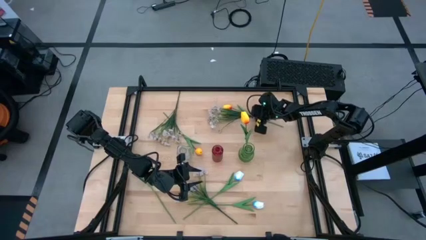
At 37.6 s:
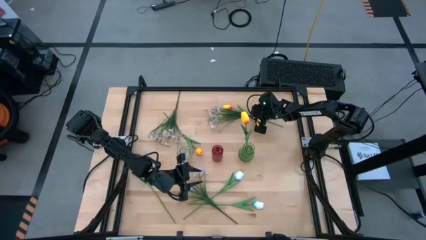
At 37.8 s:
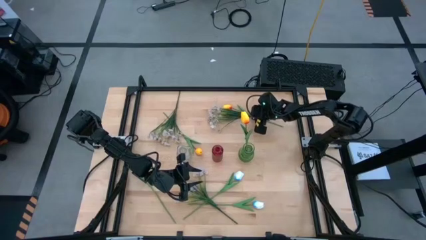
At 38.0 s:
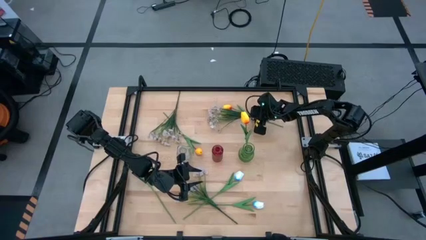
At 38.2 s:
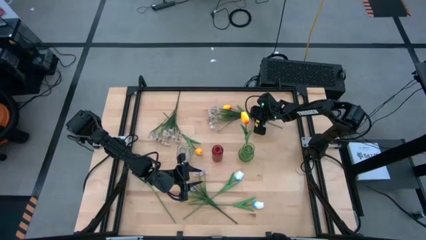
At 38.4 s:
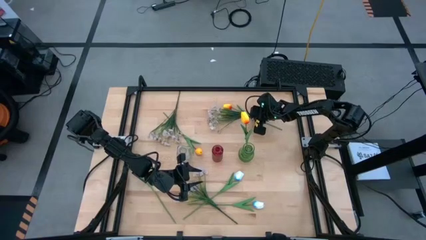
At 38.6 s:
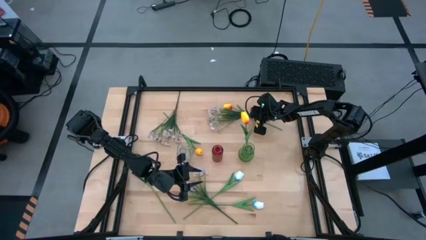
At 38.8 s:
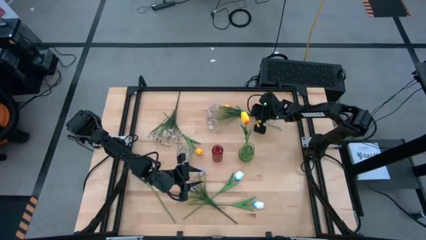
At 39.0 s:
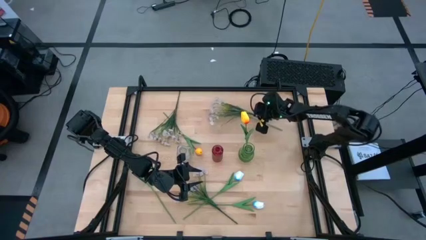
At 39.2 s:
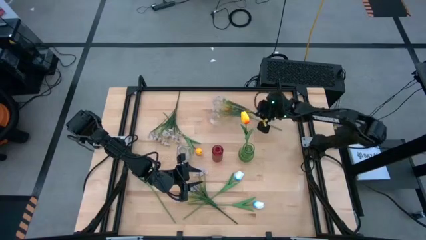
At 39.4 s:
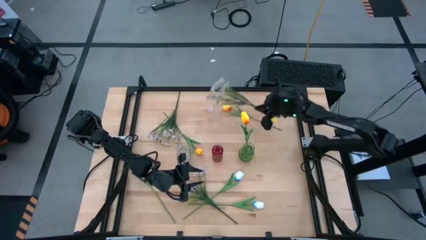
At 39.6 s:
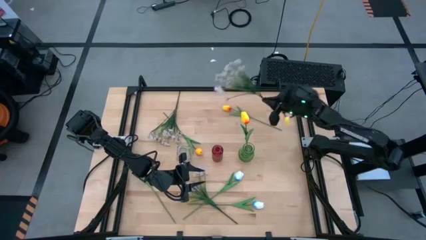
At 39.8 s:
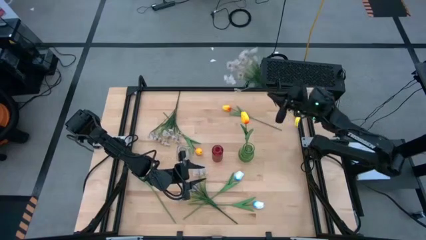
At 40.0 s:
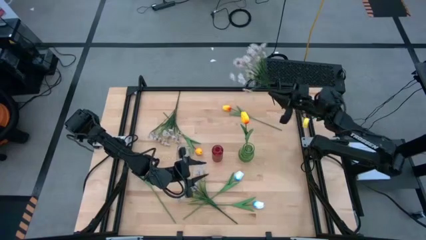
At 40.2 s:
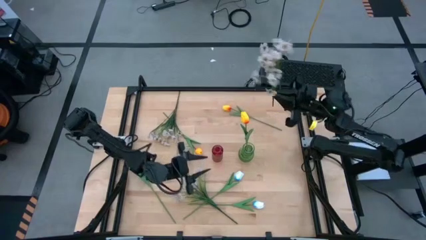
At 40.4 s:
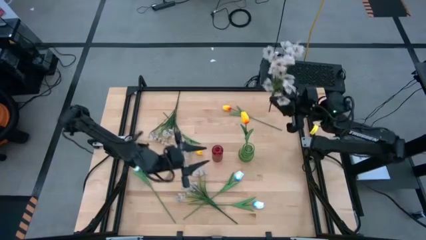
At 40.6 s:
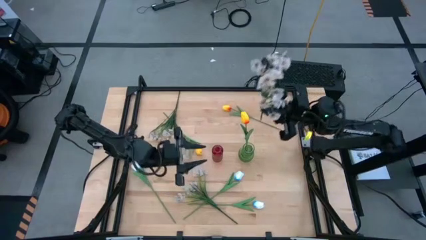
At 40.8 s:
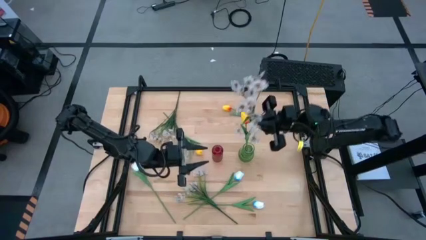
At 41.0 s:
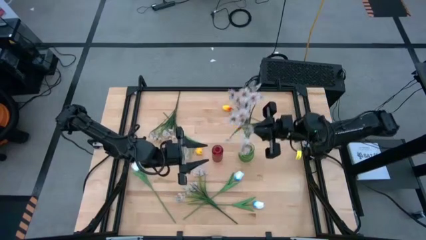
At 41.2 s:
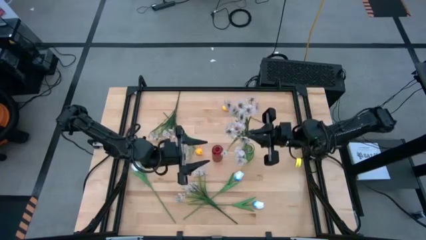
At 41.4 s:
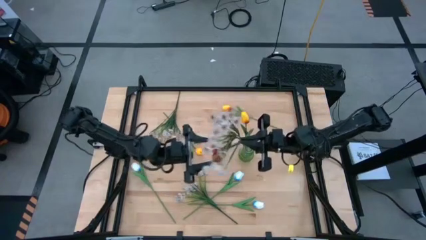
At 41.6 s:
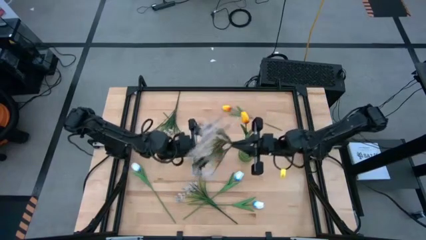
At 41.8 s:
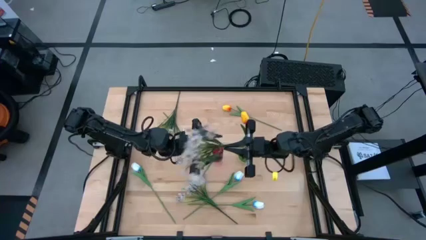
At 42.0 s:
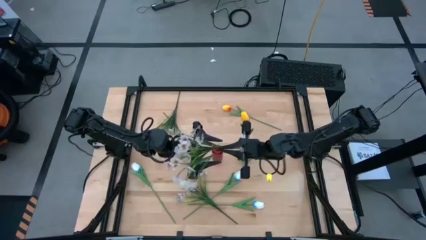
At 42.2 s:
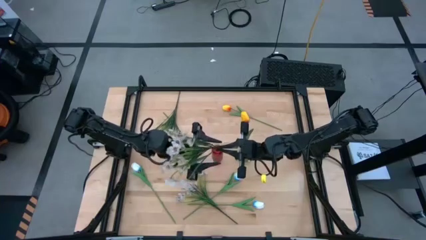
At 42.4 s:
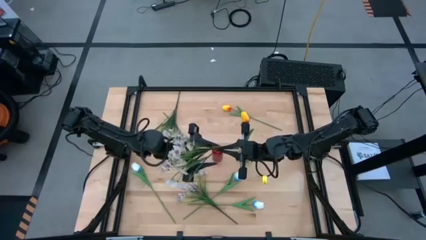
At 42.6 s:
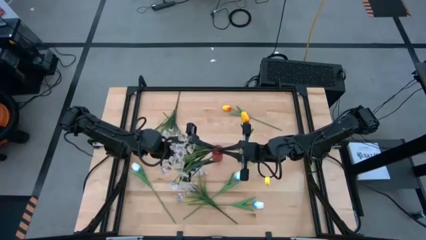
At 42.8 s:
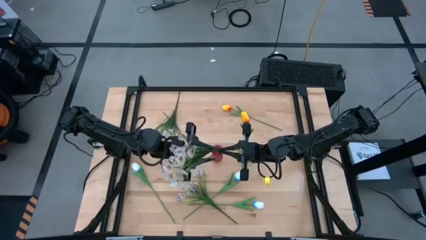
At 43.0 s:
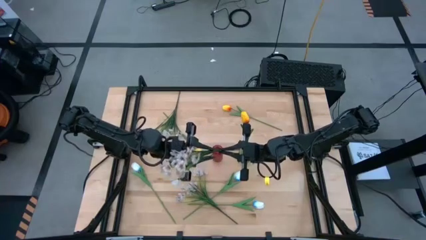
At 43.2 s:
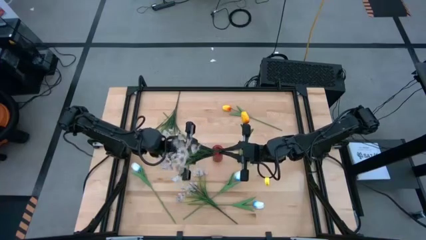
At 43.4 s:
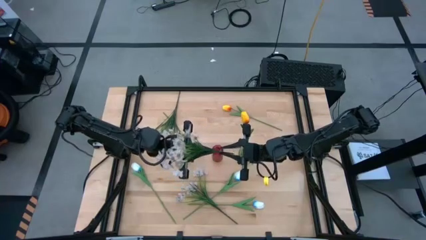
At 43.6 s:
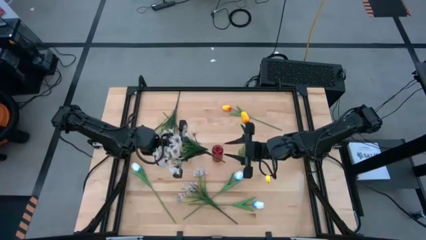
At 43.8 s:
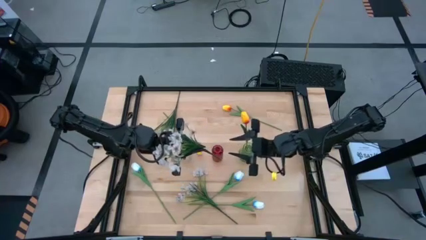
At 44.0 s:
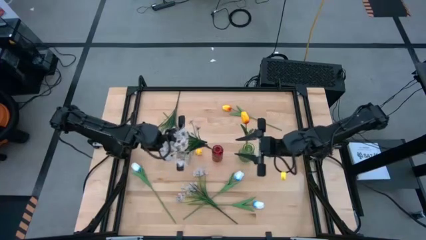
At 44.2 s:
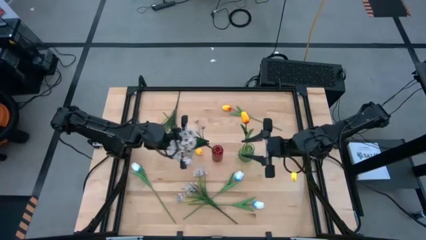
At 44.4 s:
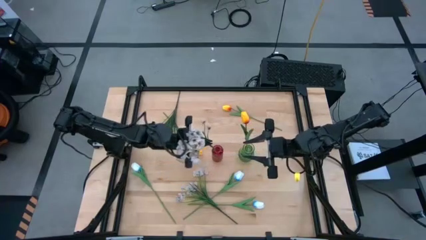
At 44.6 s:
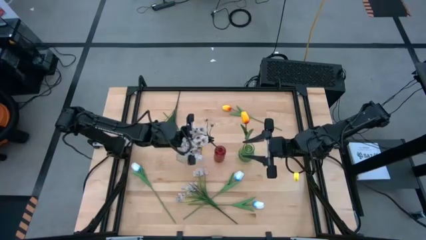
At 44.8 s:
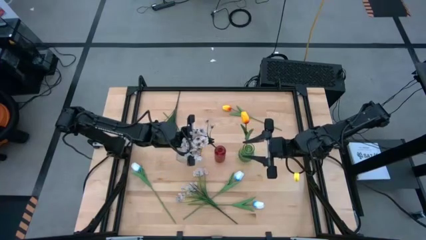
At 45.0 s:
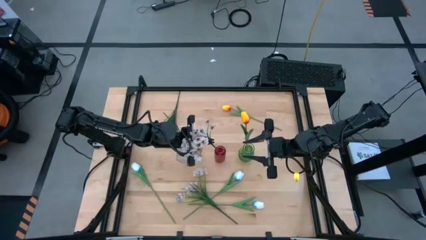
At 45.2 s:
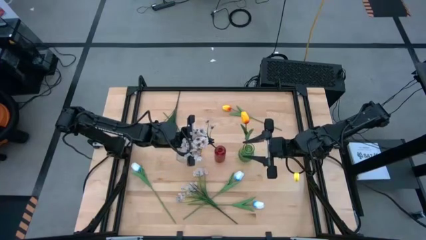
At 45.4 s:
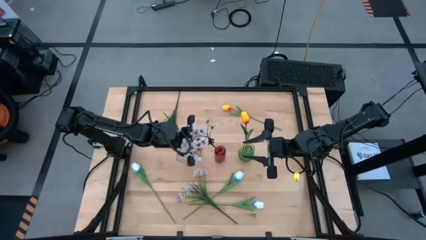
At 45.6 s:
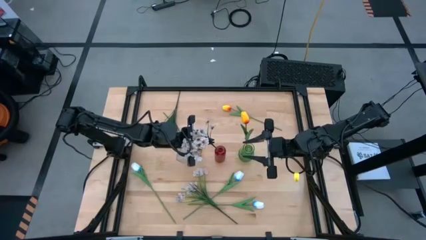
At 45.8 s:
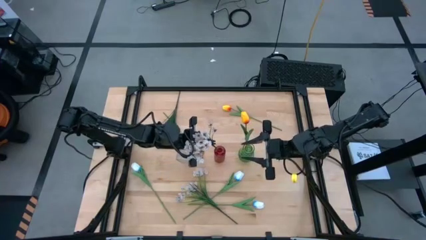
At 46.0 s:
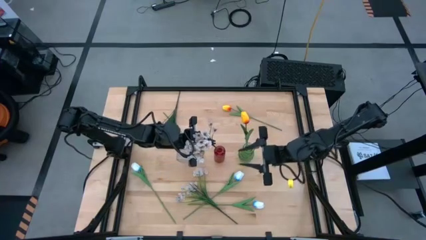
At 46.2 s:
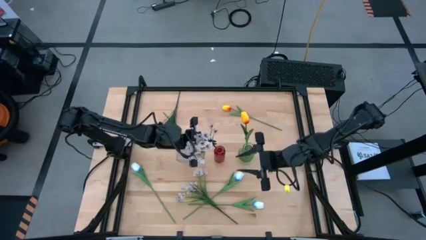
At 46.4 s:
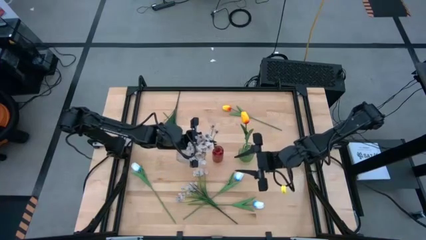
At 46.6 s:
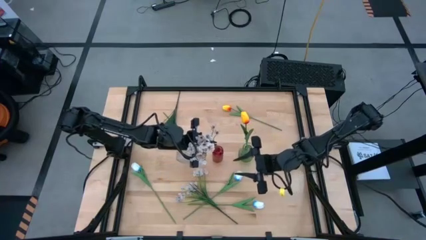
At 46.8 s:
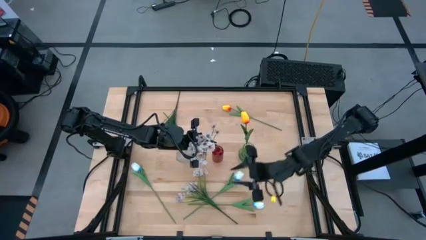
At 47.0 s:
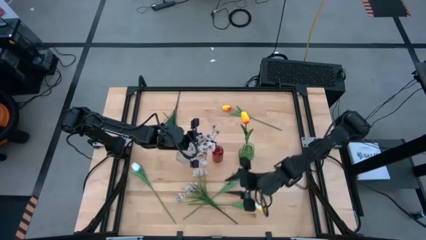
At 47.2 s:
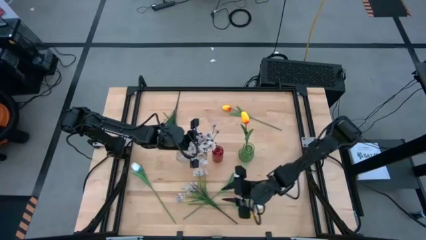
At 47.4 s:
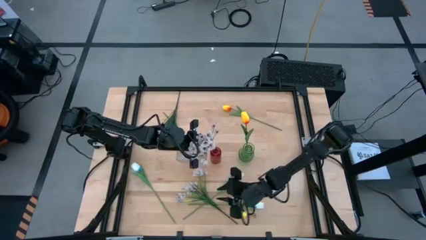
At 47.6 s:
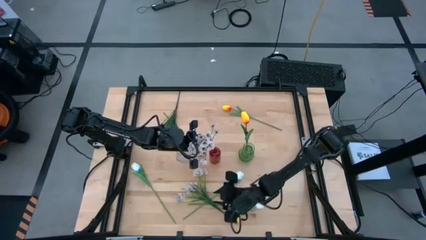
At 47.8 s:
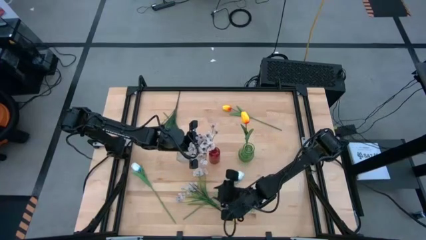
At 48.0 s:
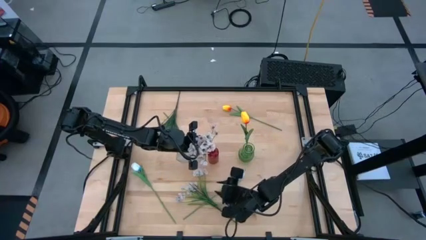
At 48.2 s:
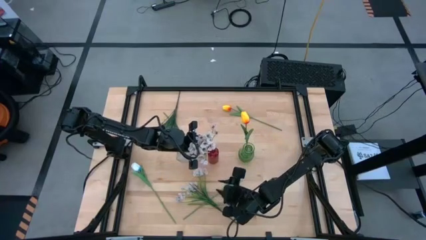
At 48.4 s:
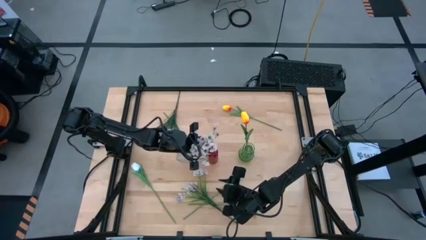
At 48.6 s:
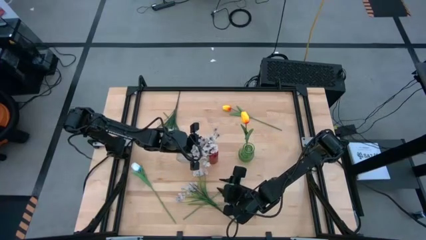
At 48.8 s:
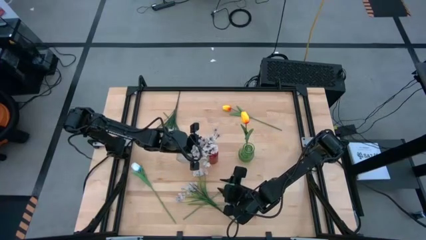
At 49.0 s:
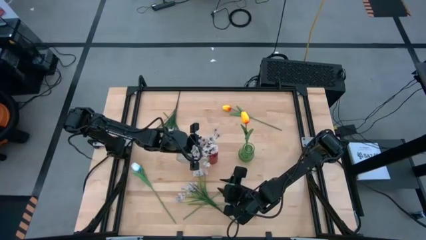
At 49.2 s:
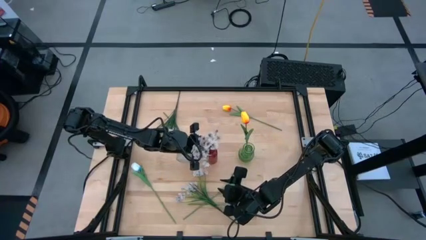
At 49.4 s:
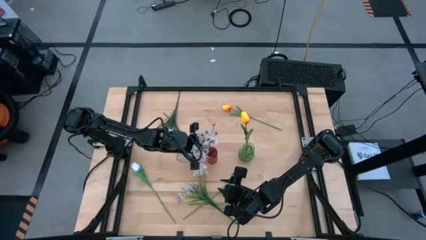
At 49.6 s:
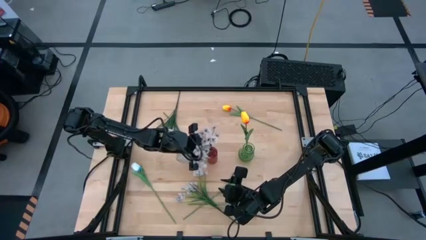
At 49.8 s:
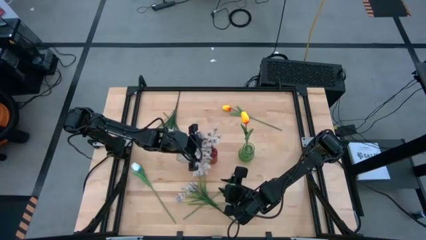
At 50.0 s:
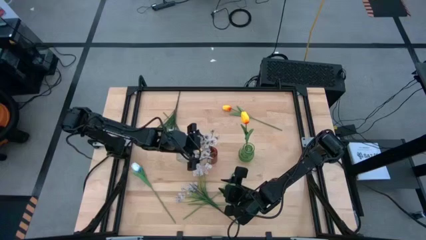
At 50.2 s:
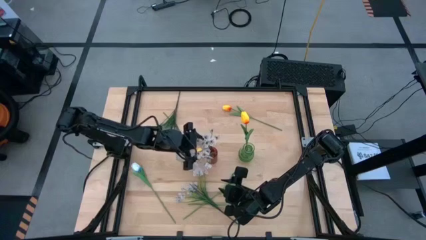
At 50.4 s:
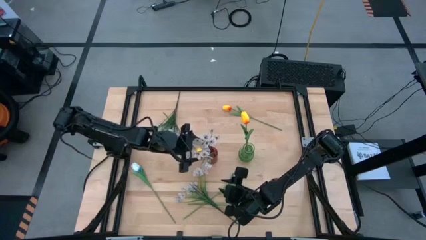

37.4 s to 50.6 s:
Task: Sort flowers into vase by color
Put the top right white flowers into the red vase

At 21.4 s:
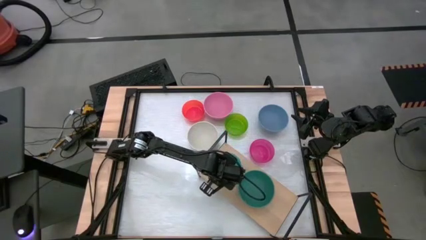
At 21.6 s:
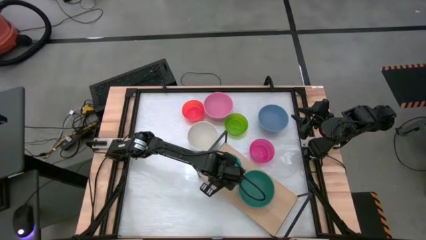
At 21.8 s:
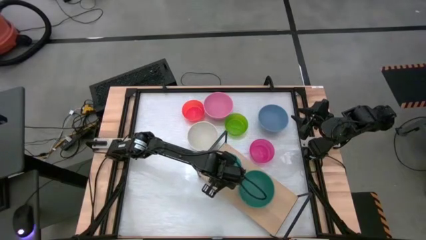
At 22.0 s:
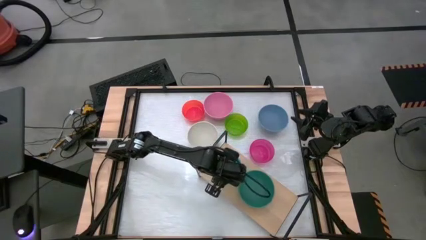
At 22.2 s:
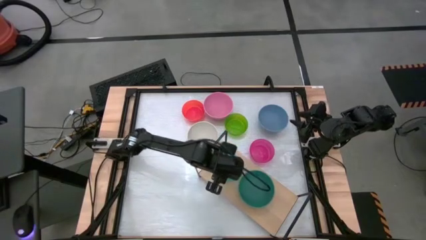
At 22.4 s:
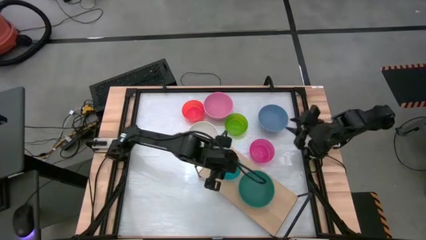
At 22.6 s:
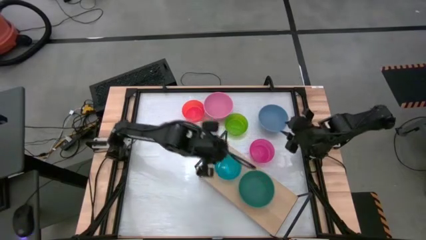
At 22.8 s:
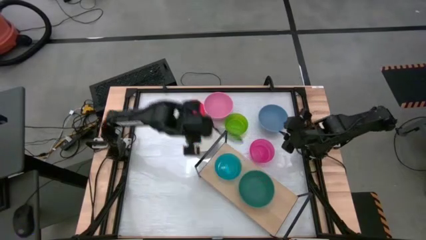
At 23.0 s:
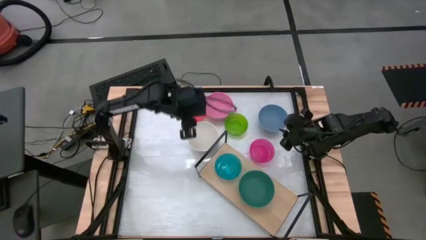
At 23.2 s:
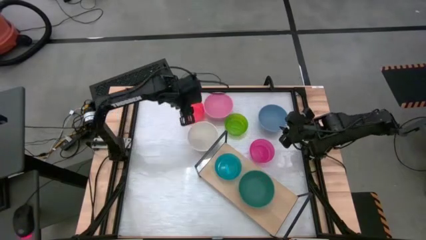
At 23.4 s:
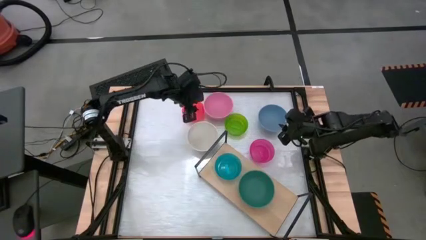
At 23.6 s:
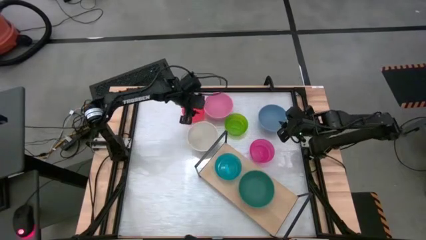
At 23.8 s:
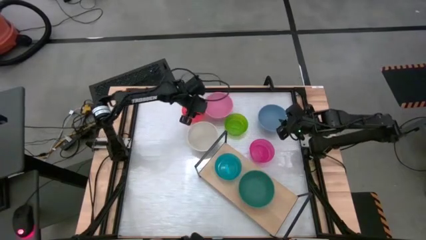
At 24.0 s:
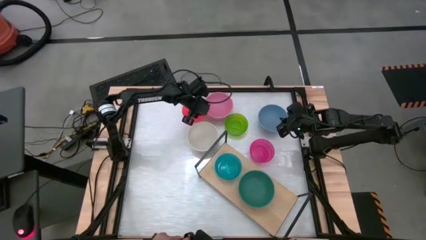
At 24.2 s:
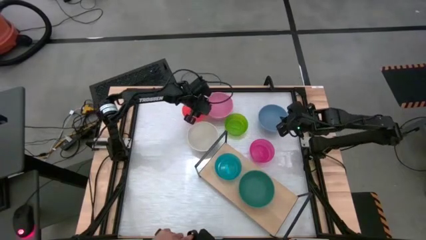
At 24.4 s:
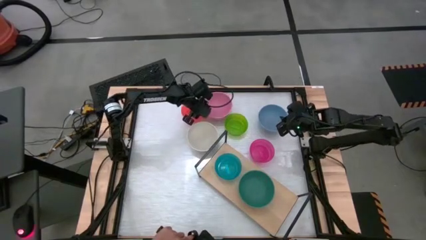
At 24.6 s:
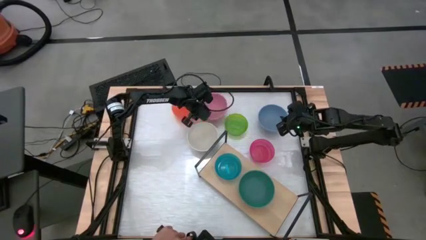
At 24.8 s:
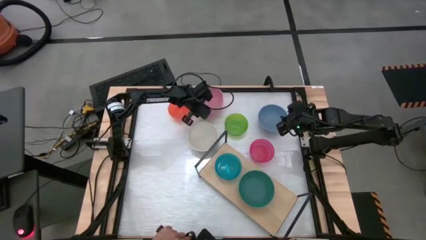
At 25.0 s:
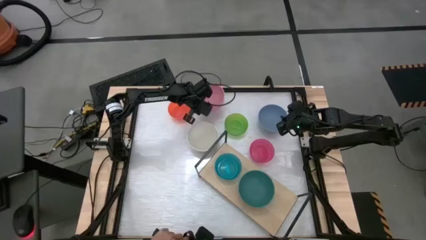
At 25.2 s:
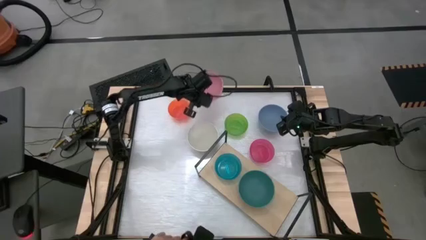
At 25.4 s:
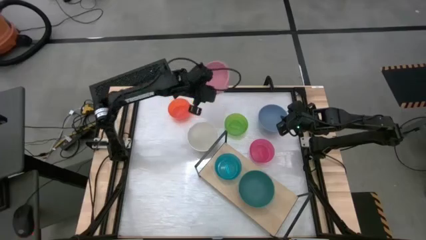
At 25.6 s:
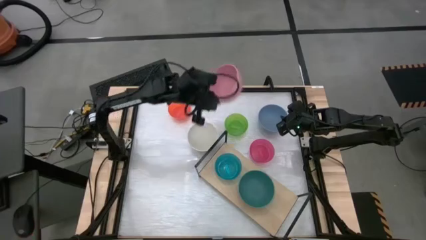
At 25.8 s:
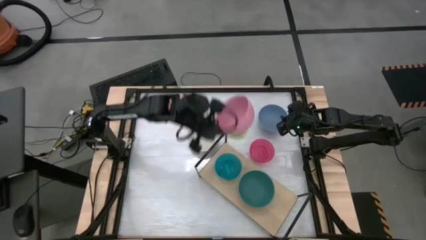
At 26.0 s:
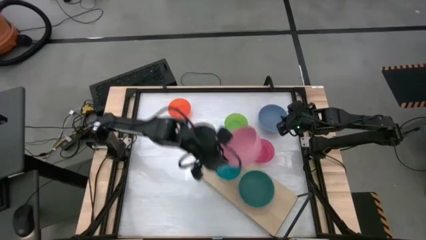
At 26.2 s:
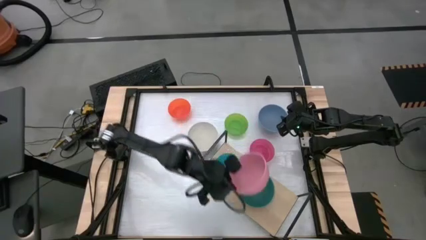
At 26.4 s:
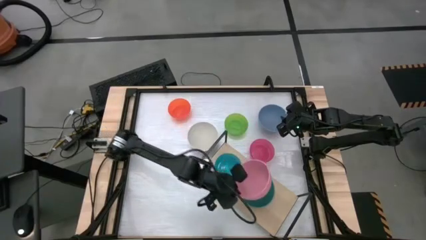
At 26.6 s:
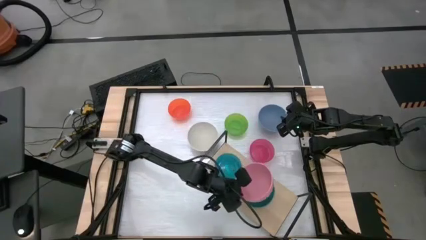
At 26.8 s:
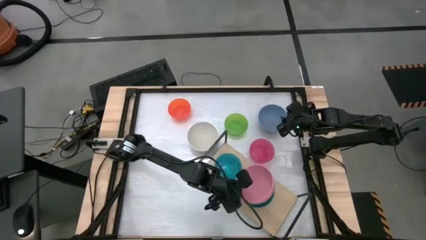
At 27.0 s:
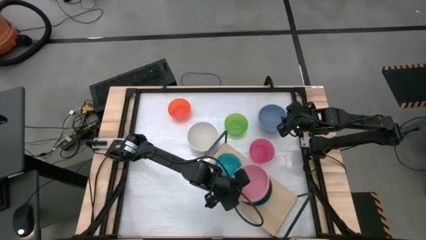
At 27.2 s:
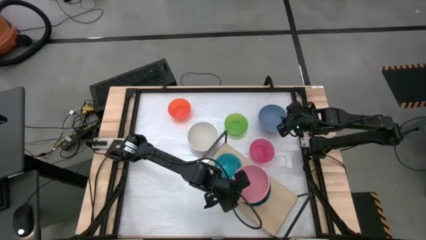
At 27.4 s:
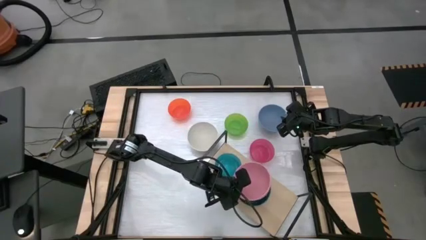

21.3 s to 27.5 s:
Task: Place and stack bowls onto a shelf
Stack the large pink bowl on the large green bowl on the shelf
